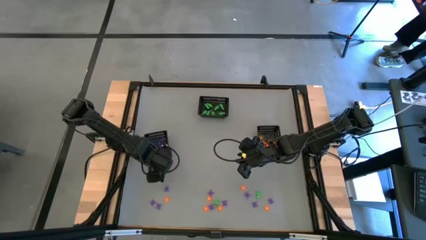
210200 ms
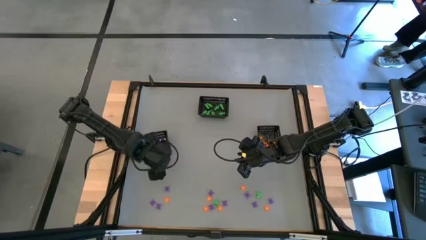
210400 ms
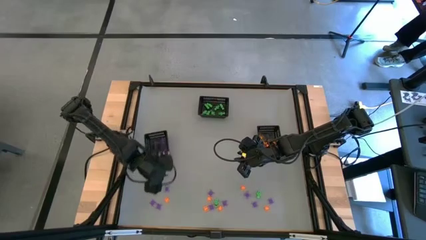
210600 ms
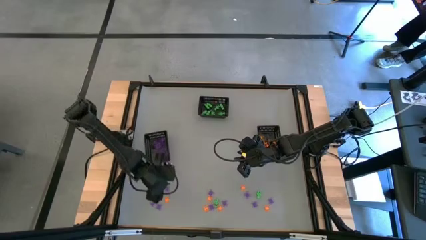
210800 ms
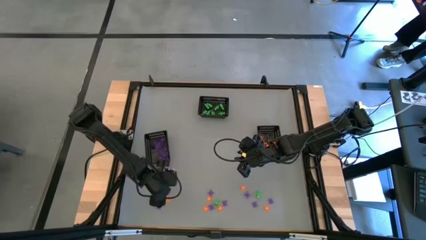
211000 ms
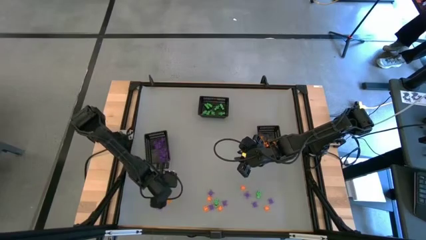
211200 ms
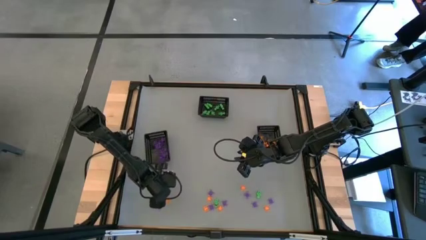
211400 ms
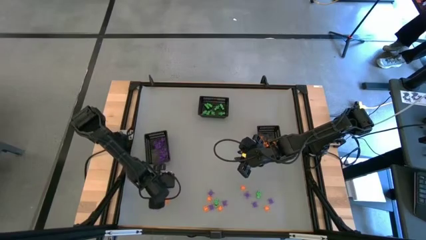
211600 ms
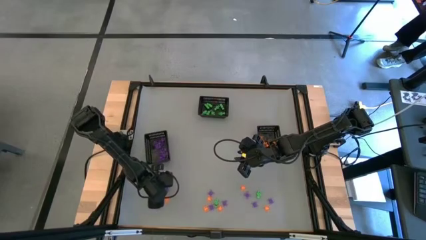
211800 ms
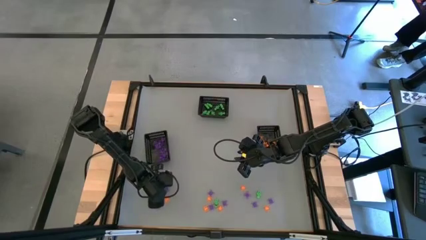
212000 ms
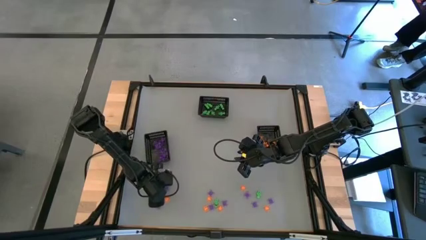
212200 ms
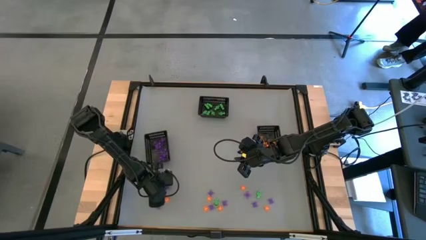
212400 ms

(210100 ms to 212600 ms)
Task: Sort Halloween decoration
Put the violet spider toy into the left bin

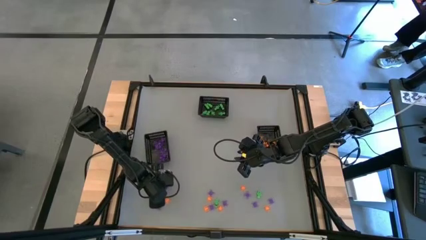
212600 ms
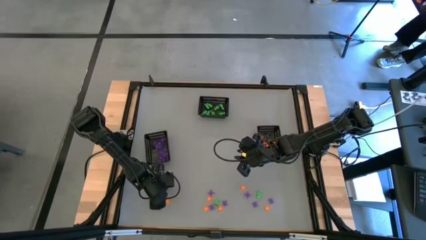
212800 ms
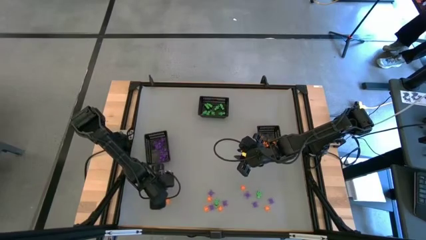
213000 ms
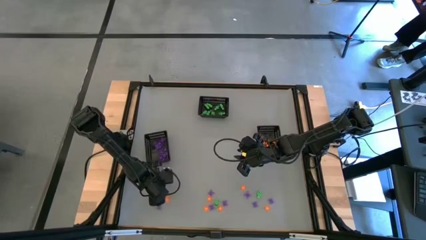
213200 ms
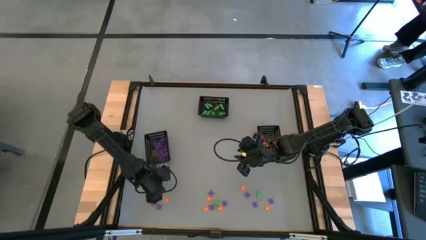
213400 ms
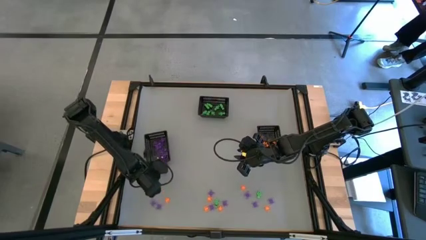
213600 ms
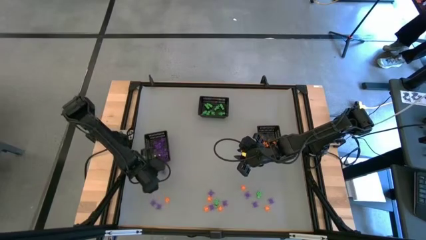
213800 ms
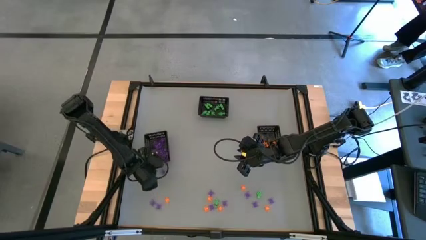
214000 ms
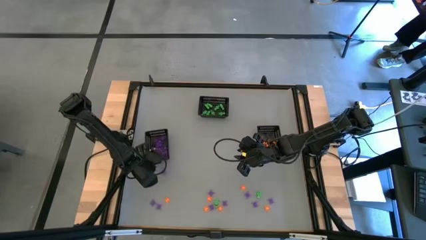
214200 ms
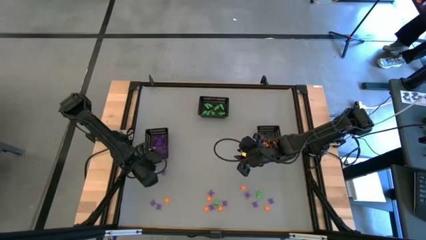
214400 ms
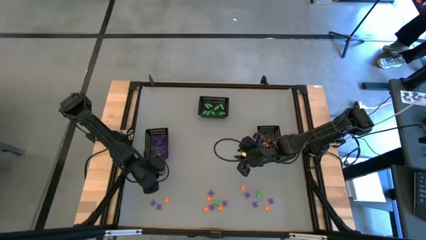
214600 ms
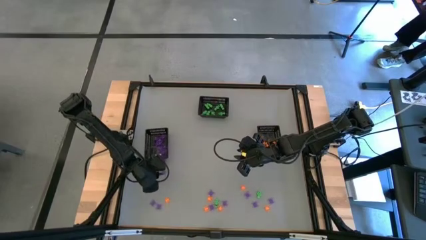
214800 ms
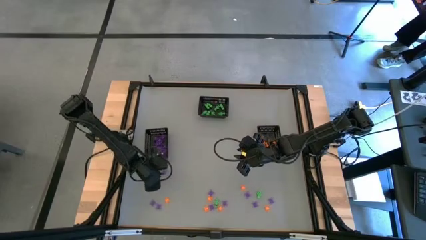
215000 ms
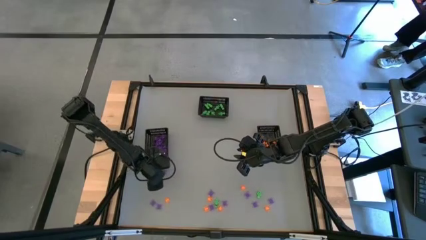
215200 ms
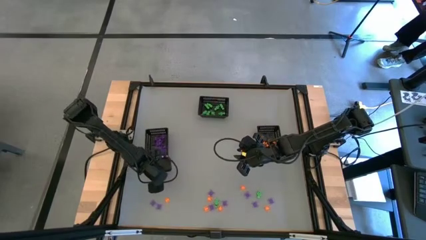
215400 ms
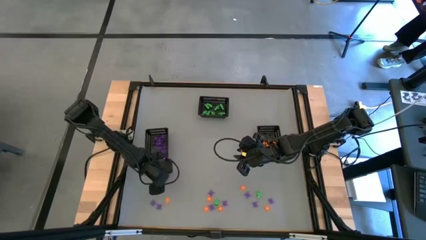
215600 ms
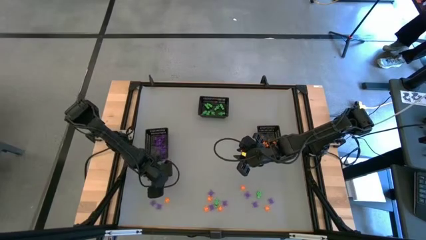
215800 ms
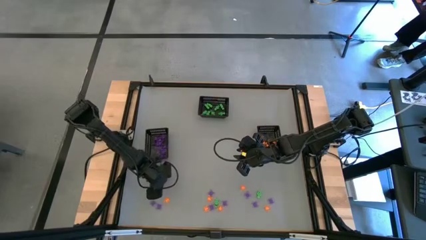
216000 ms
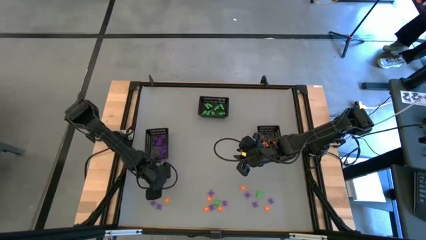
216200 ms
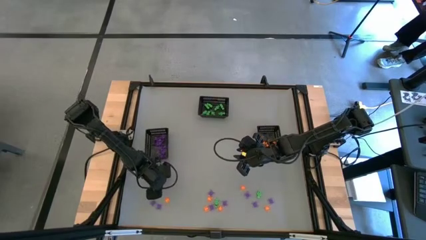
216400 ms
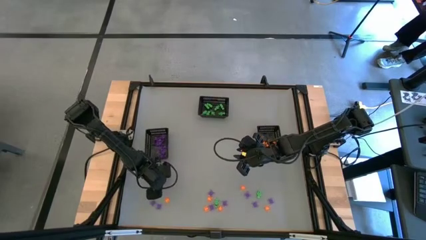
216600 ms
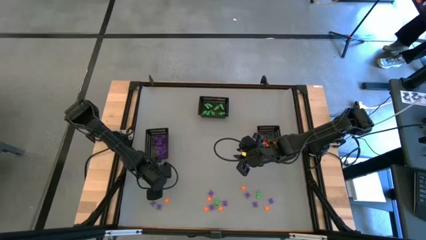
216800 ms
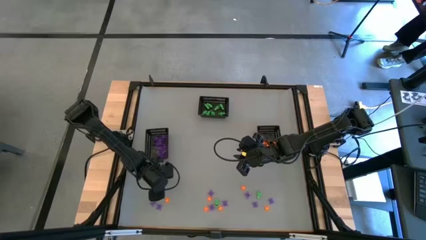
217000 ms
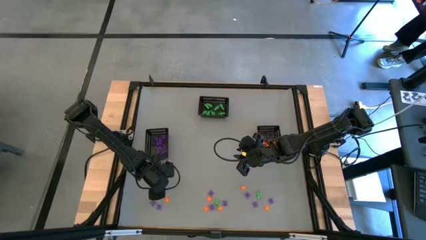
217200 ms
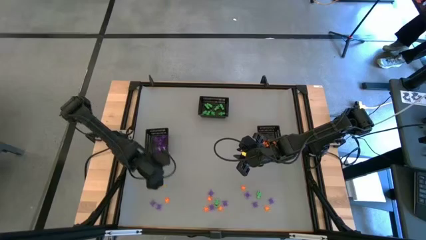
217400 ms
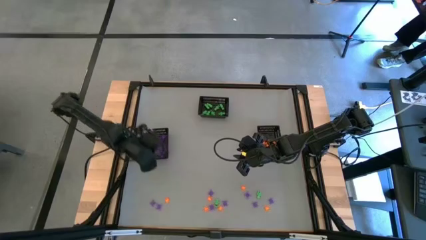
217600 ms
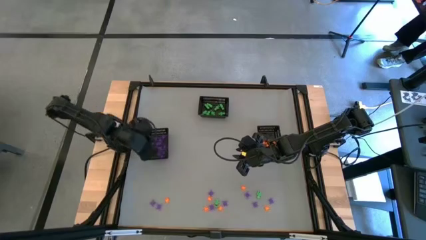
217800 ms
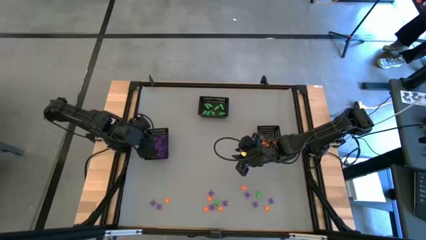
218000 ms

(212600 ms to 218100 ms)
Put the violet spider toy into the left bin

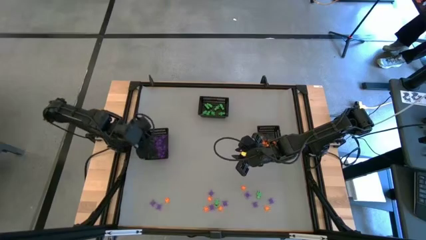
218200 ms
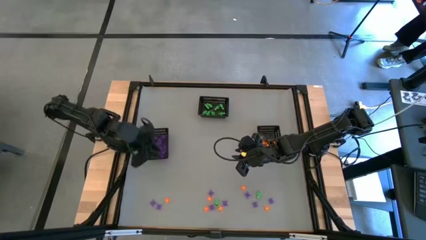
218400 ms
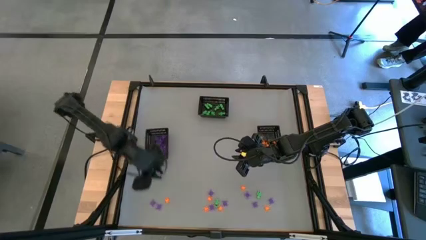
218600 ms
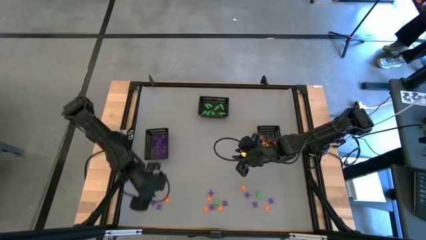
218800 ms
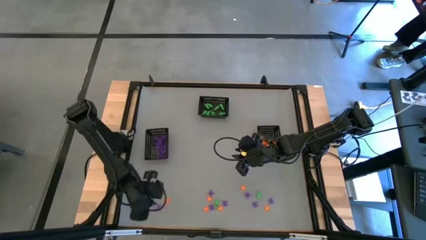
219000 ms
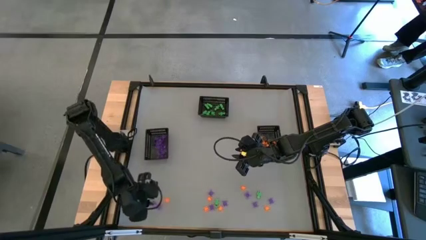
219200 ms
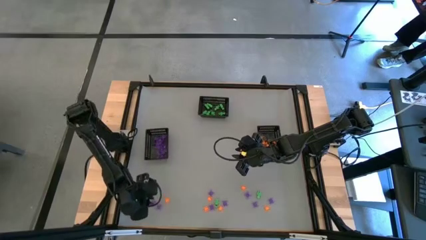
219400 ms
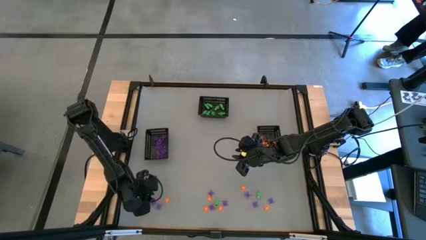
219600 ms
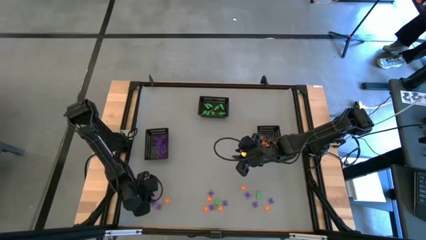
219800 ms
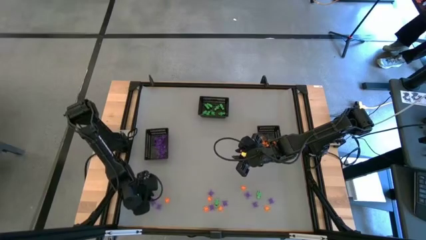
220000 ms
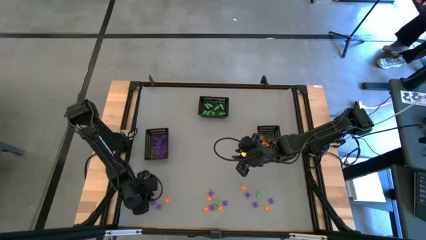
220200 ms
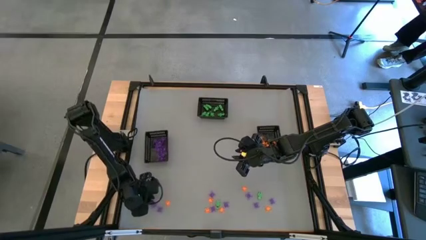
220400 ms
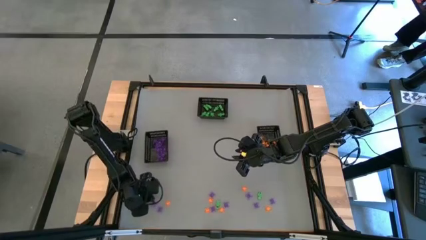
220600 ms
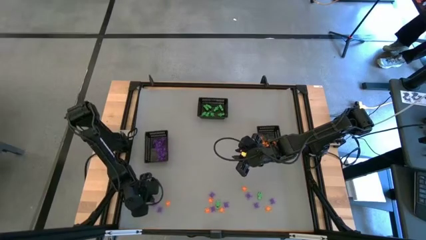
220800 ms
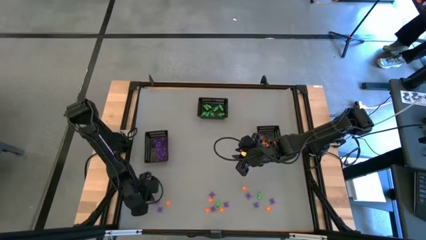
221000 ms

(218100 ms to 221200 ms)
Put the violet spider toy into the left bin

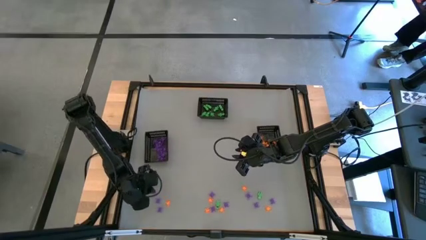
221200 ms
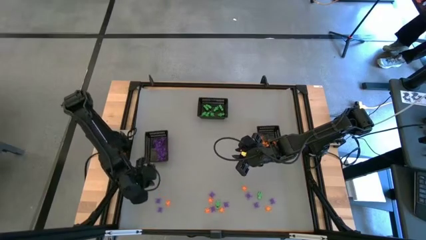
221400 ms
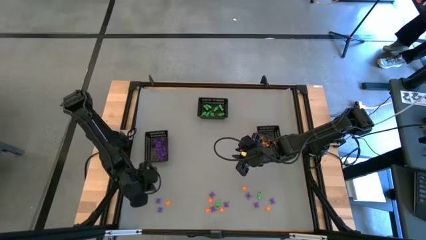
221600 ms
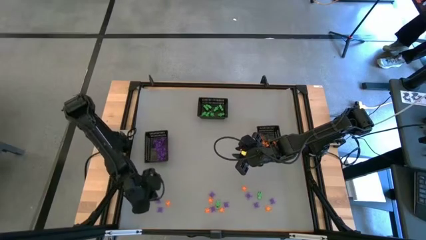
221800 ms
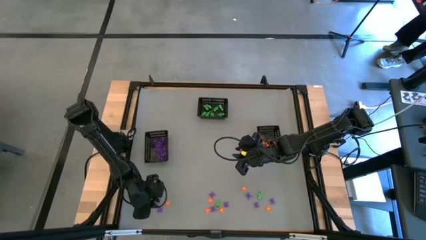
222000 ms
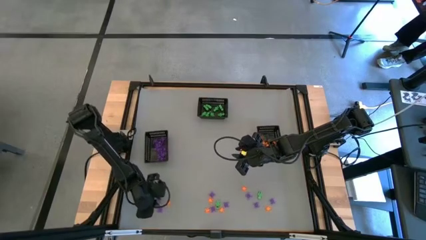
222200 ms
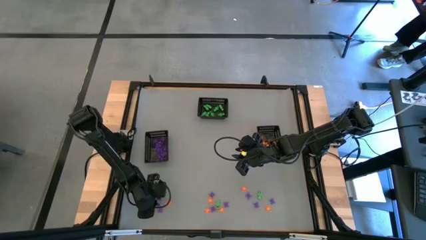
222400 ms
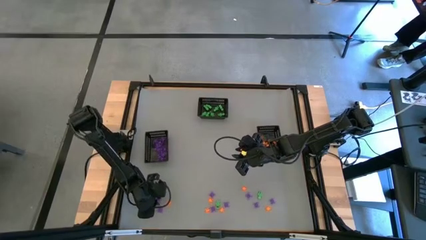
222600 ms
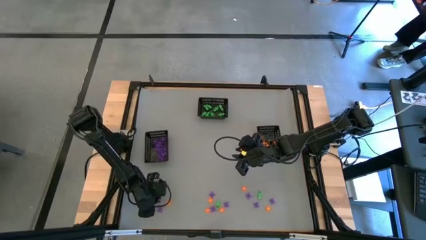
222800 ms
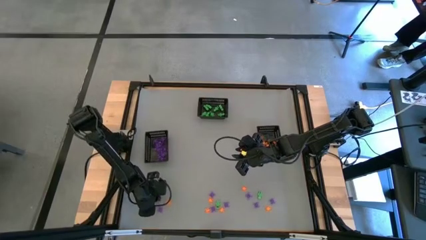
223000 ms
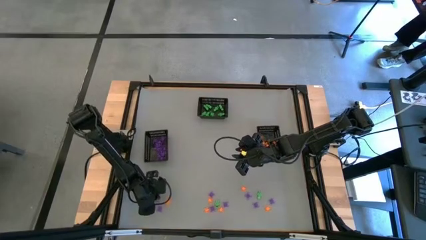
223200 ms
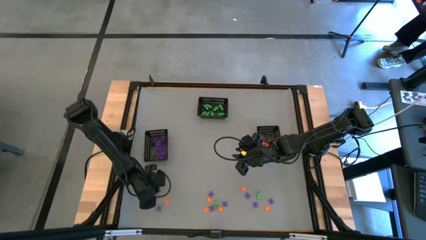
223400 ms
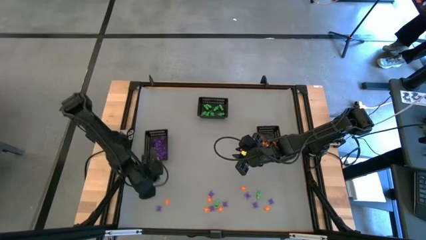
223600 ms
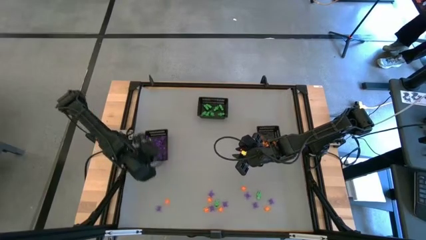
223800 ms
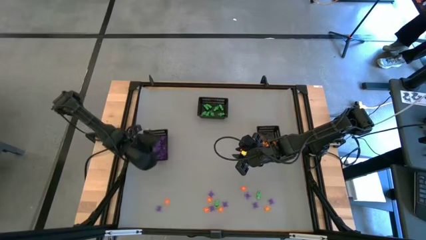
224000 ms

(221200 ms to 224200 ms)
Put the violet spider toy into the left bin

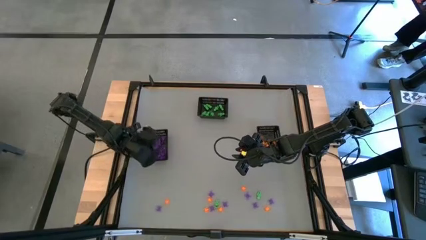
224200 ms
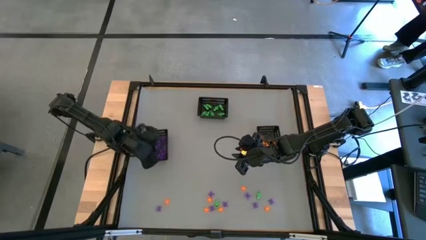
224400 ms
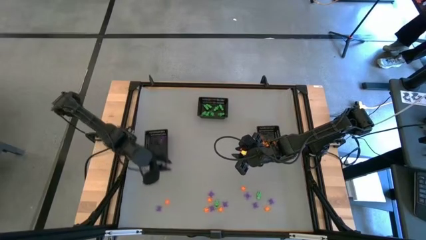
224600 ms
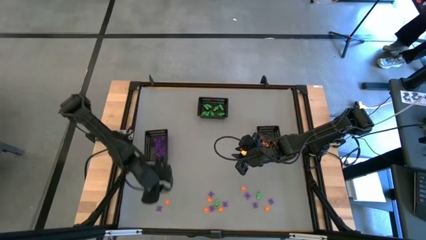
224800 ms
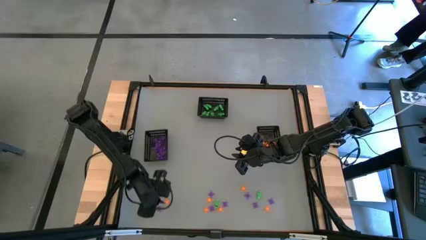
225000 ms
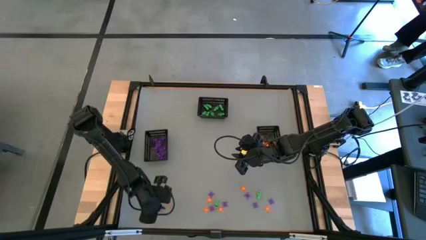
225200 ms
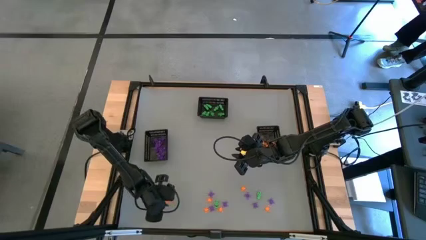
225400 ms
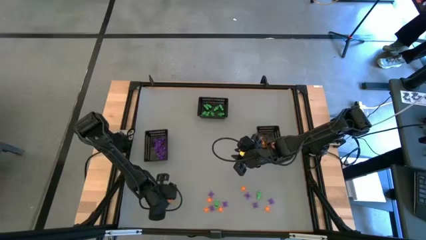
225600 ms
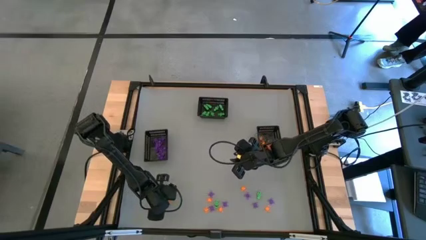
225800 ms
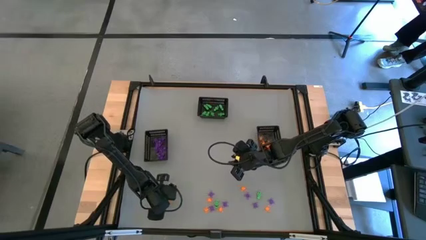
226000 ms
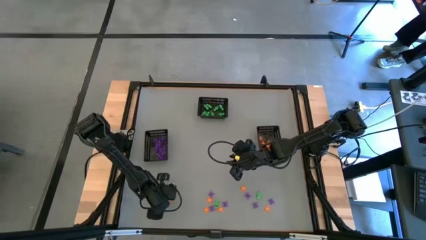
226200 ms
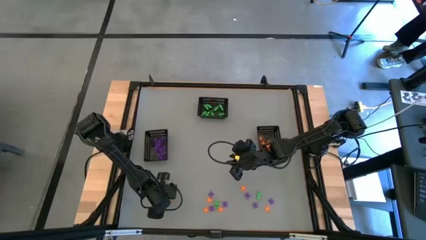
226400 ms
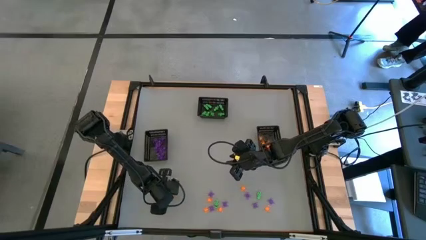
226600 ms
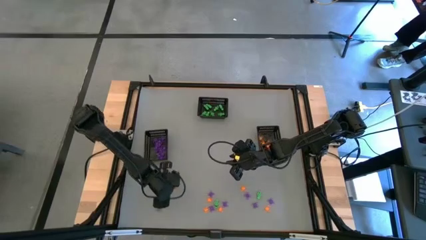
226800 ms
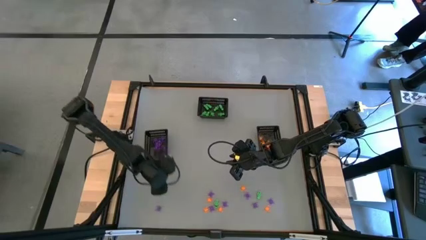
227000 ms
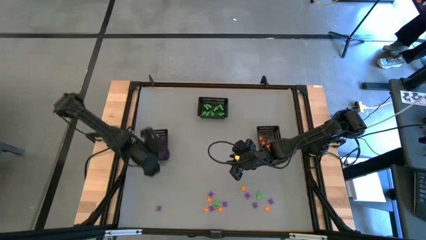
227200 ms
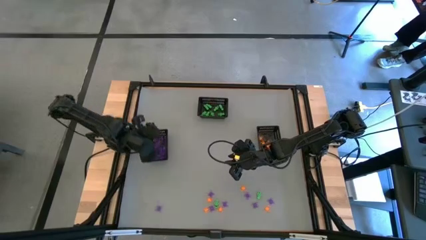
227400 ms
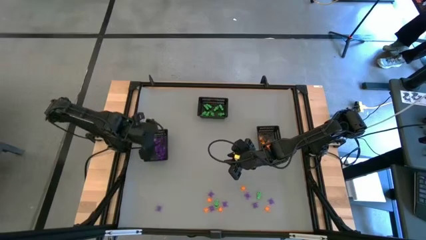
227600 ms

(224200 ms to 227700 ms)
Put the orange spider toy into the left bin
